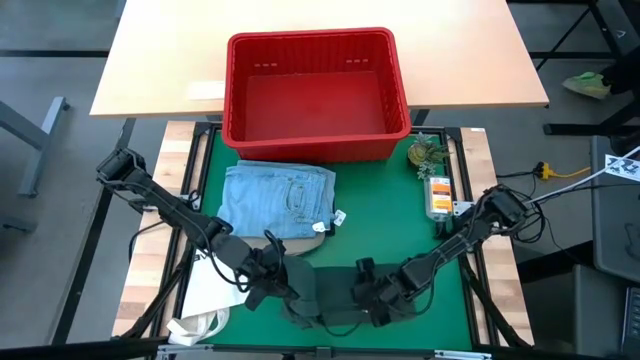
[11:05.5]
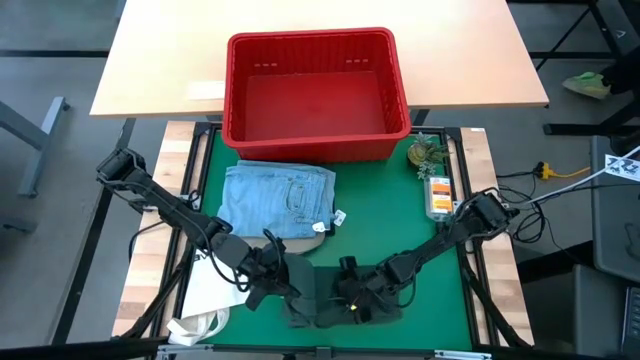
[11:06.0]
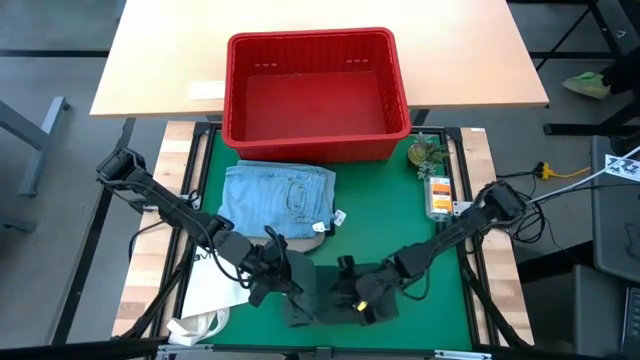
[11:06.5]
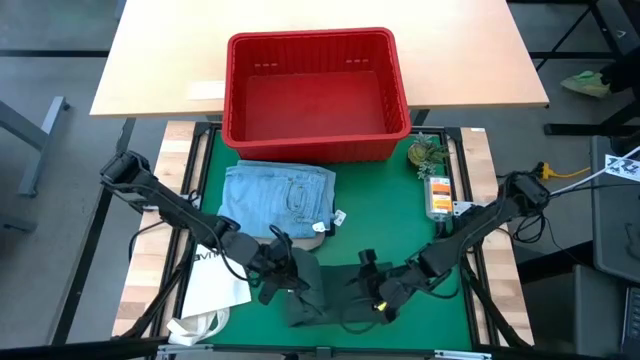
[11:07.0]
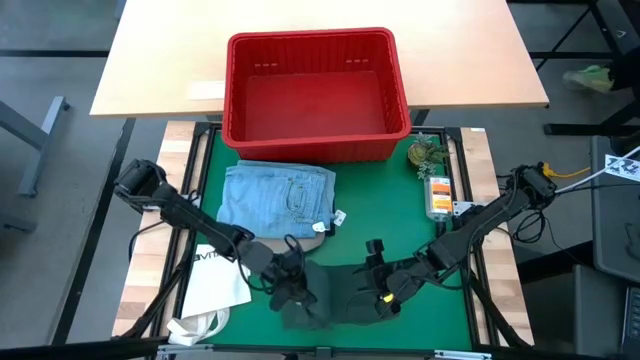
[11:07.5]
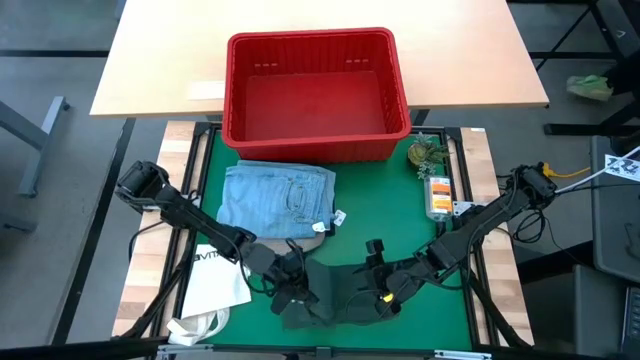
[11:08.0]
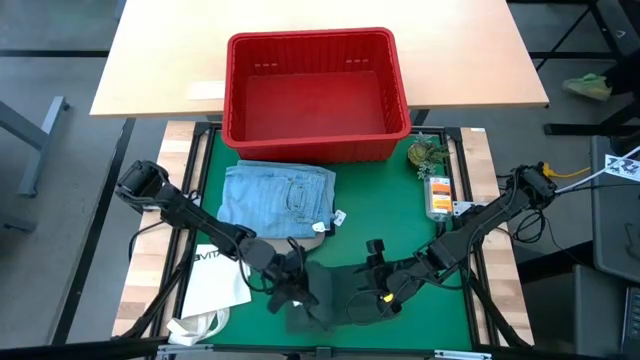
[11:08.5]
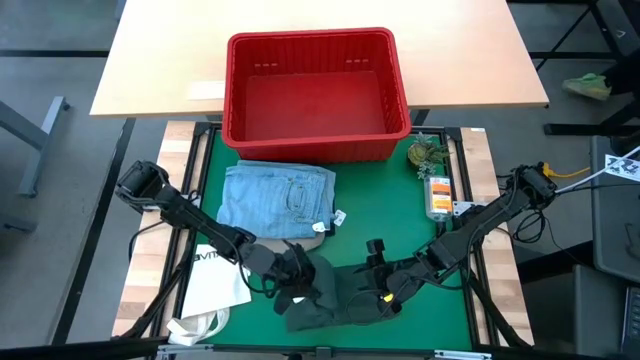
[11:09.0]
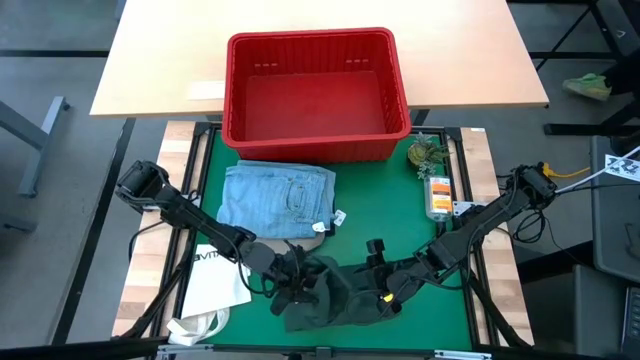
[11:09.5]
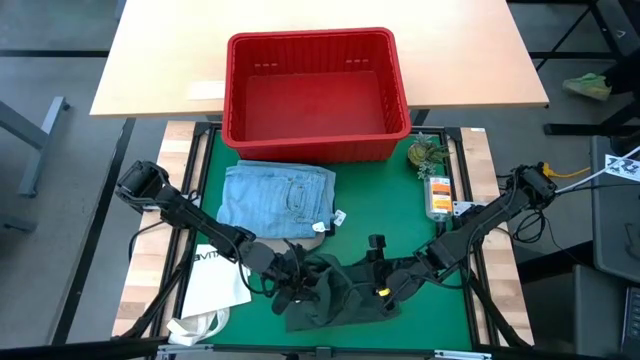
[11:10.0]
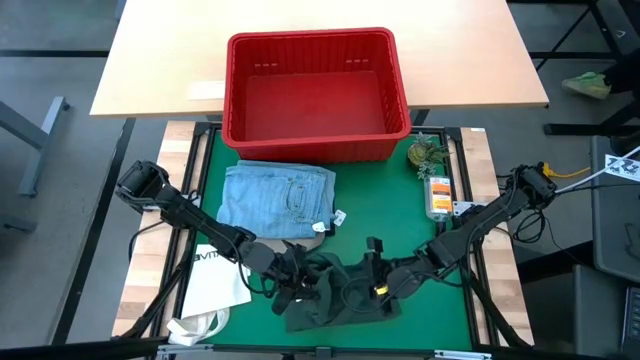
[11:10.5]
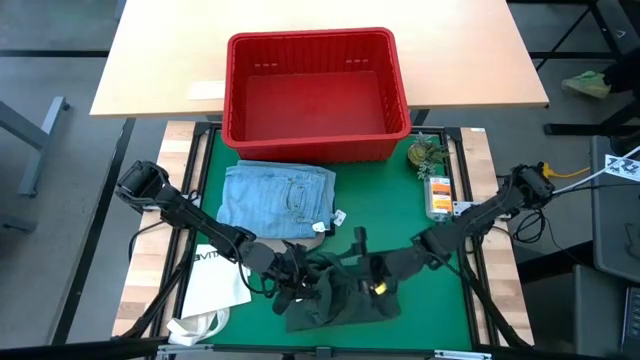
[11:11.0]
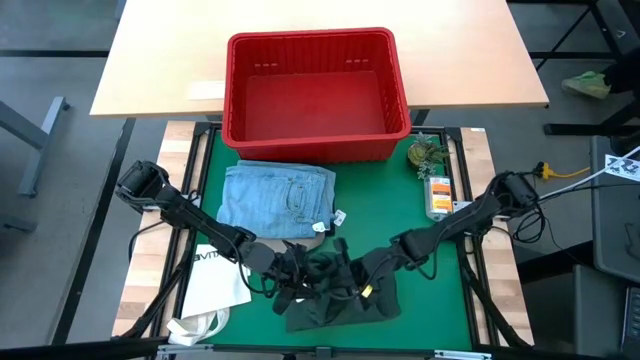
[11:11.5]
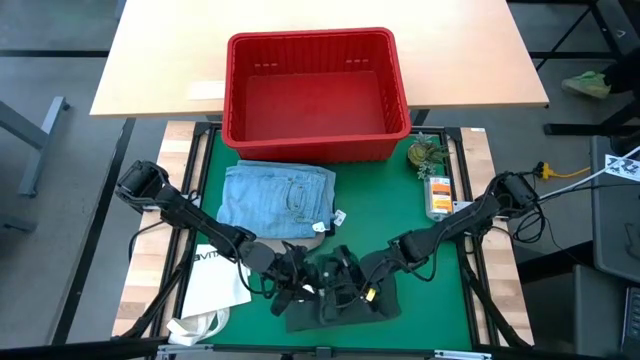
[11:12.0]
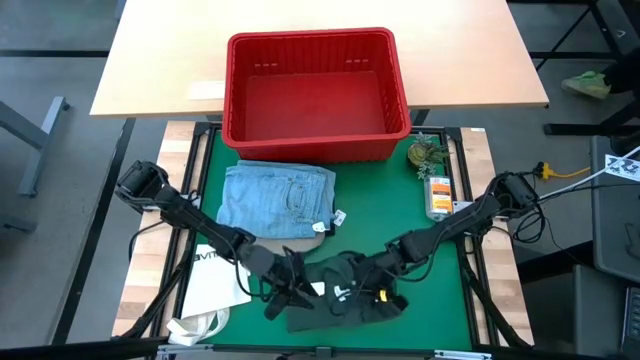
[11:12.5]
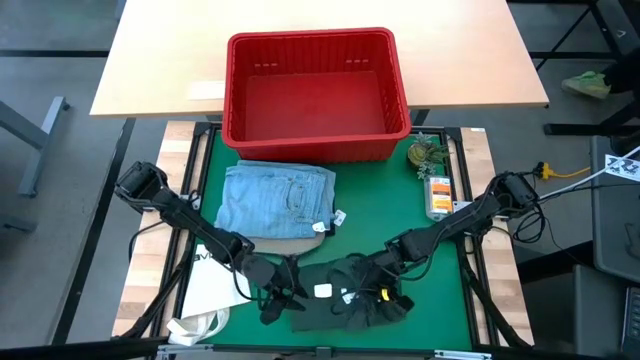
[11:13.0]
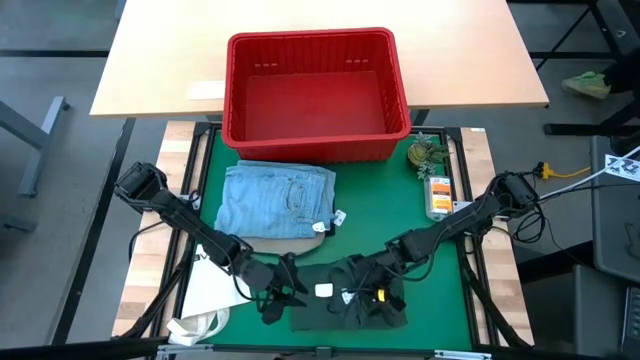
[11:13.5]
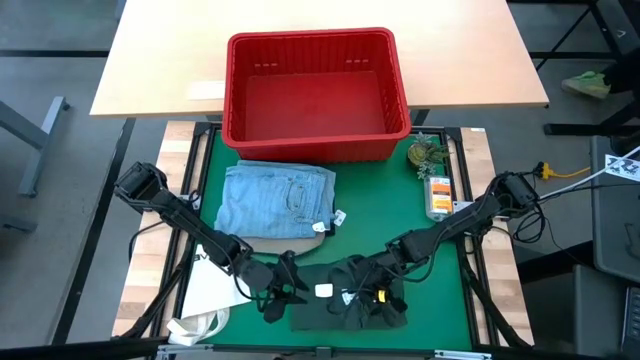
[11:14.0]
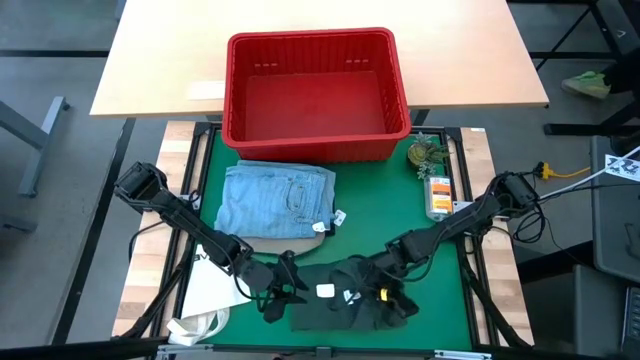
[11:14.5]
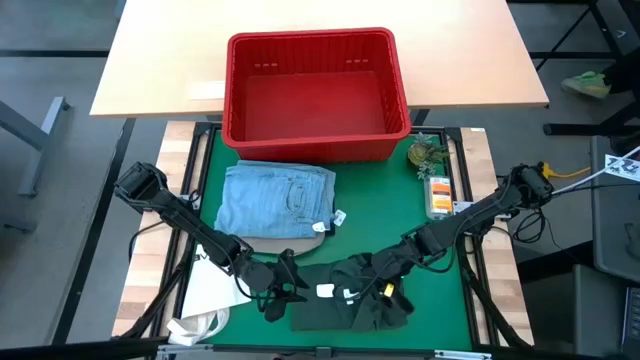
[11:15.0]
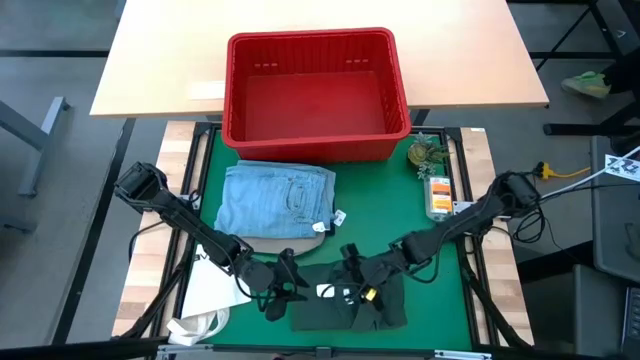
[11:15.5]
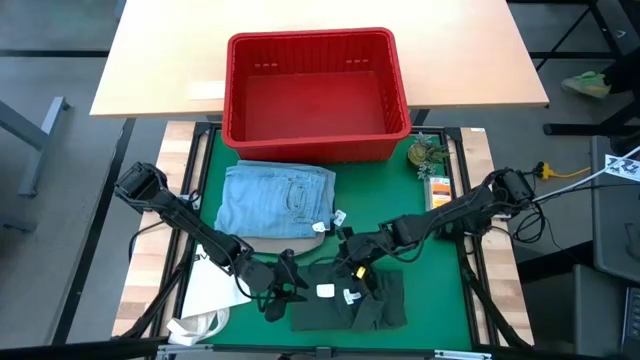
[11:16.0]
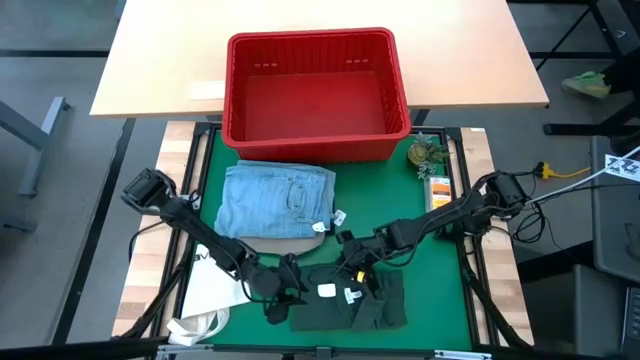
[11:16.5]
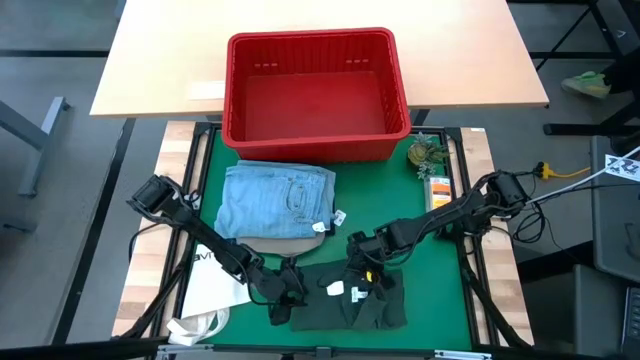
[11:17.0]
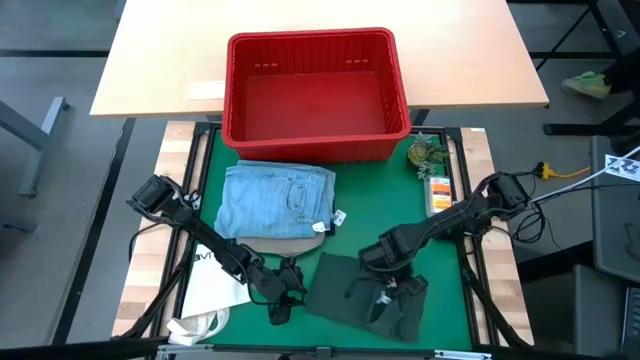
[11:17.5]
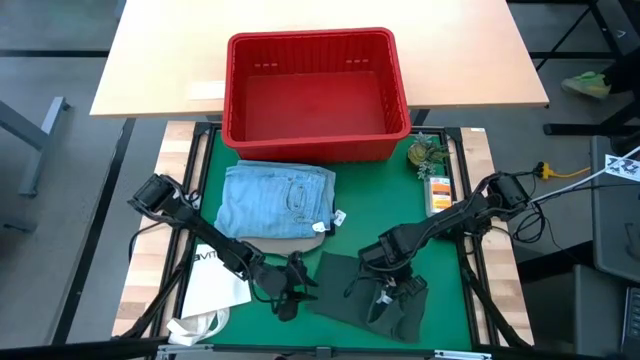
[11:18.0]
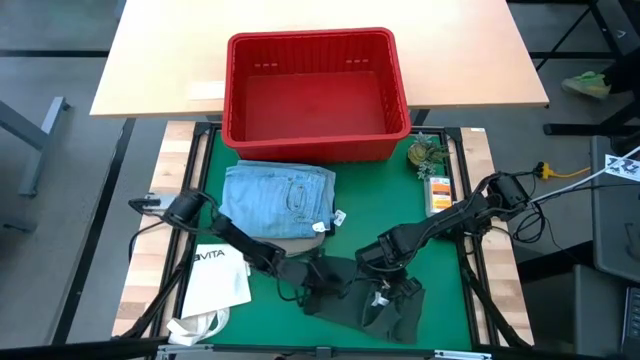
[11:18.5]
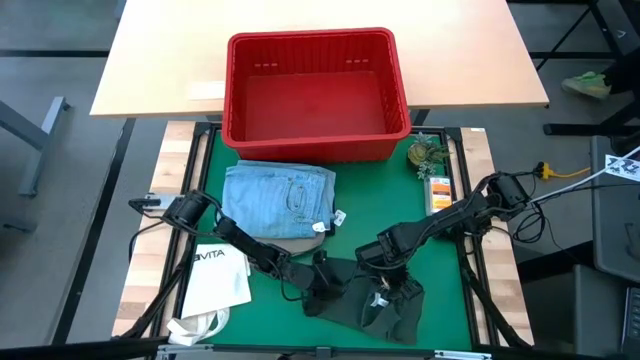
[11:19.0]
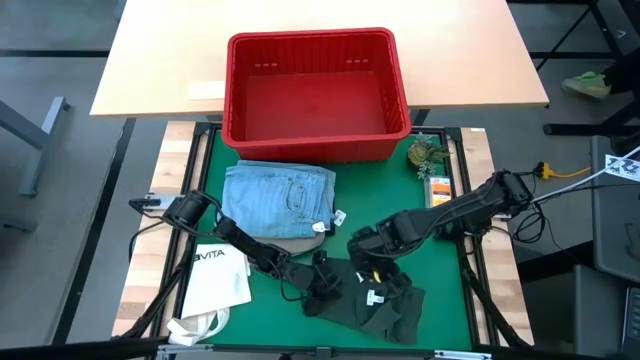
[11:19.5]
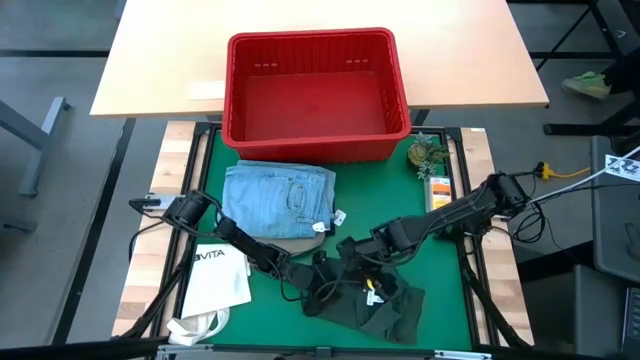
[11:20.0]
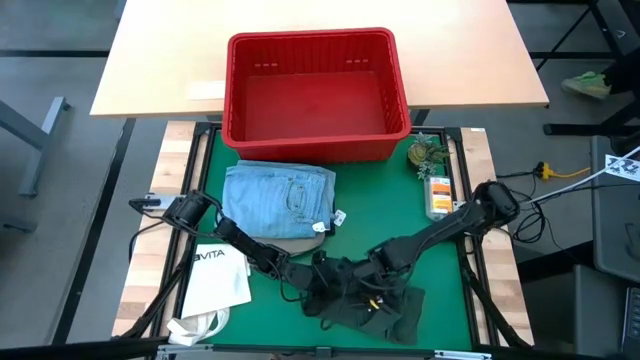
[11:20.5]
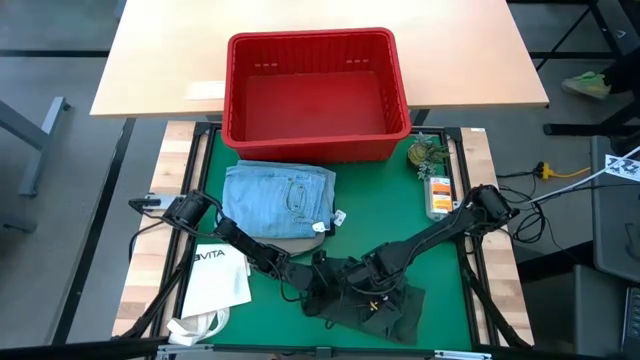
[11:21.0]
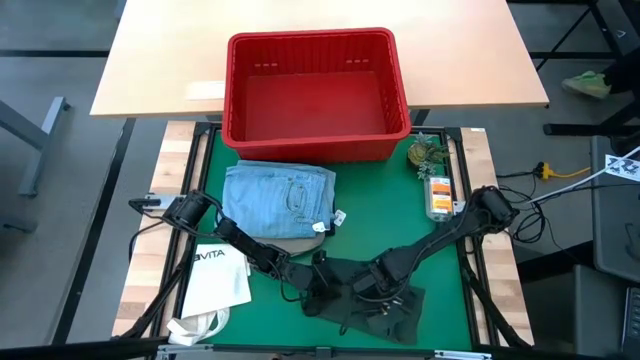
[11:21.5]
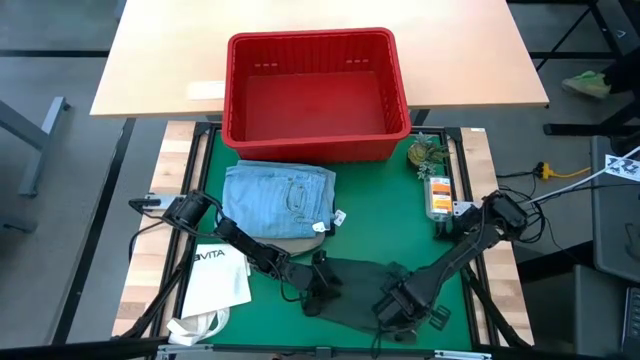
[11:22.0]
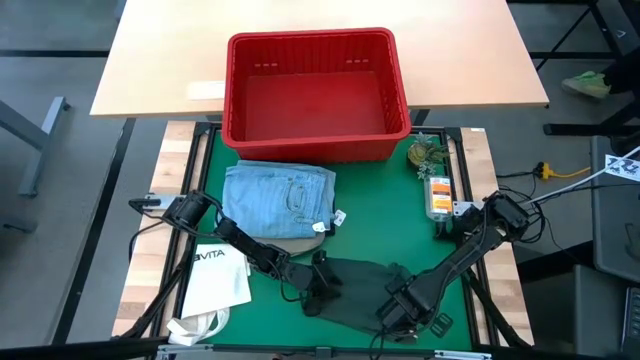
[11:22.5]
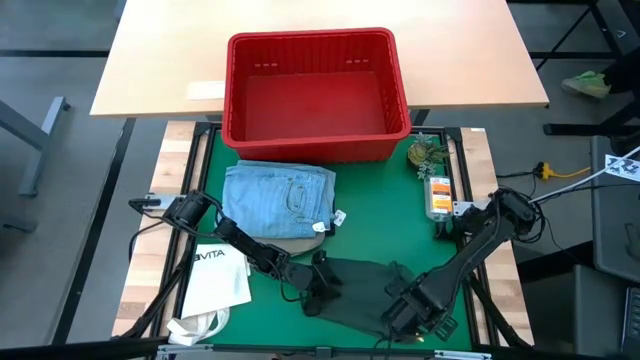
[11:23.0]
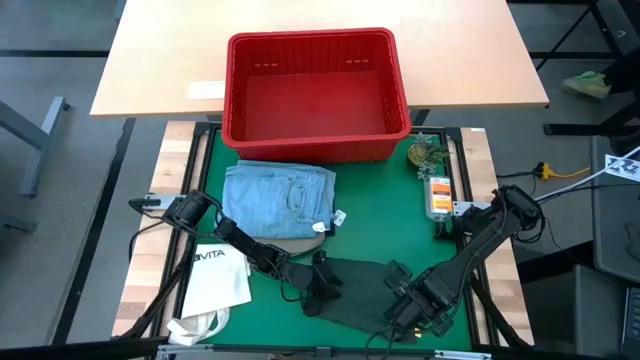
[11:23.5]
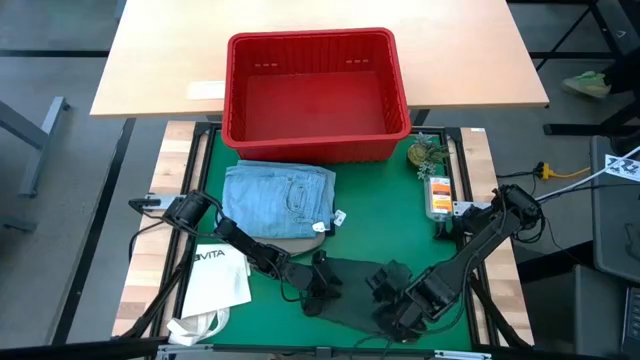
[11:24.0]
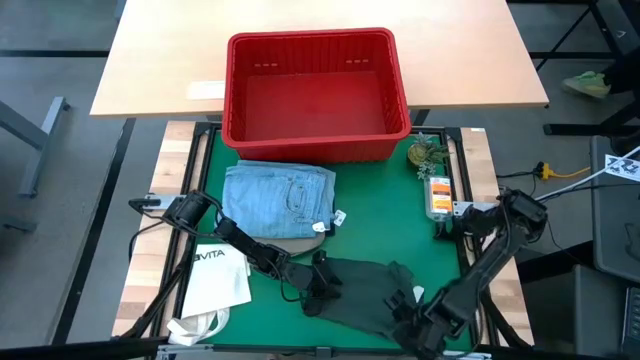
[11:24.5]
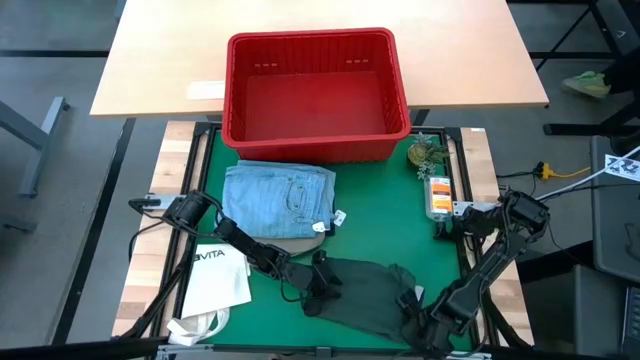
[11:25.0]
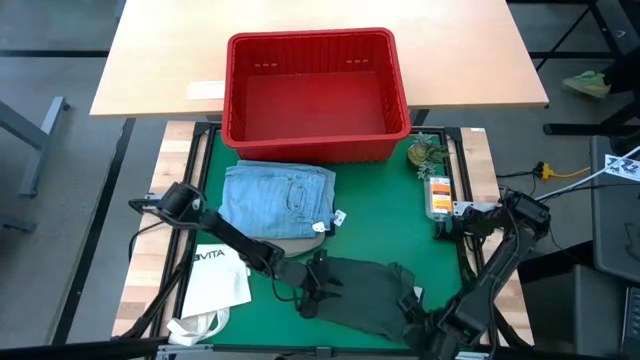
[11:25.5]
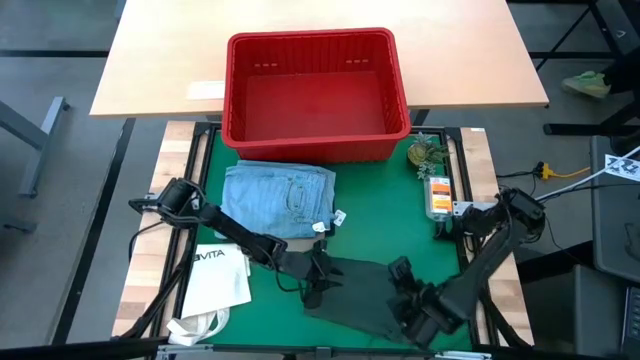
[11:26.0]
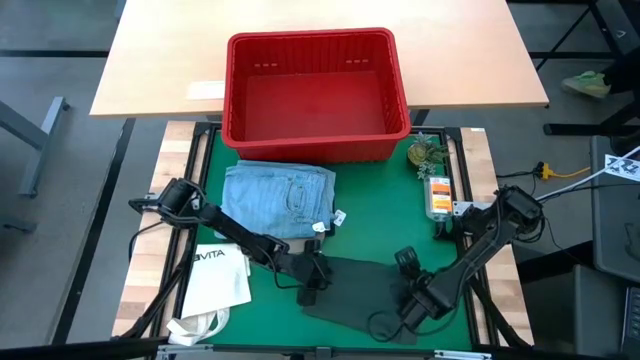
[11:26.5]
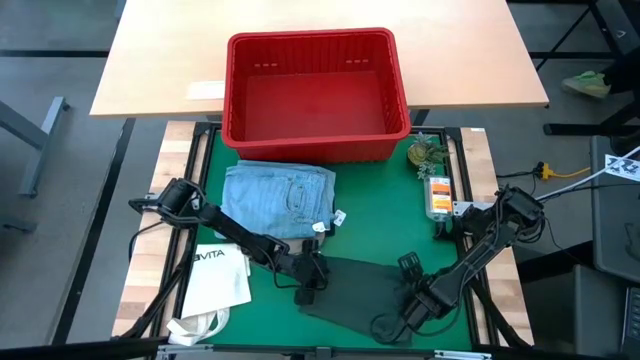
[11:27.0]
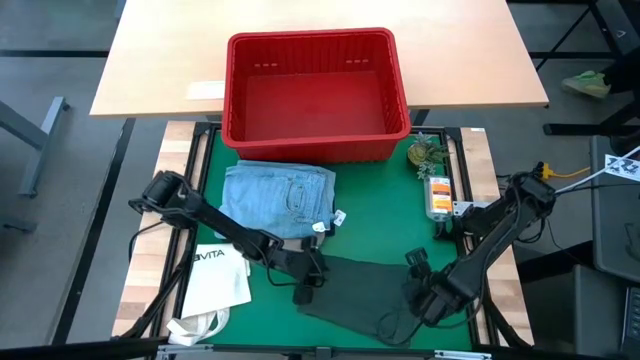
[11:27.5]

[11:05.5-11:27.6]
Task: Fold Laundry from Bin
Fold the green polo shirt
